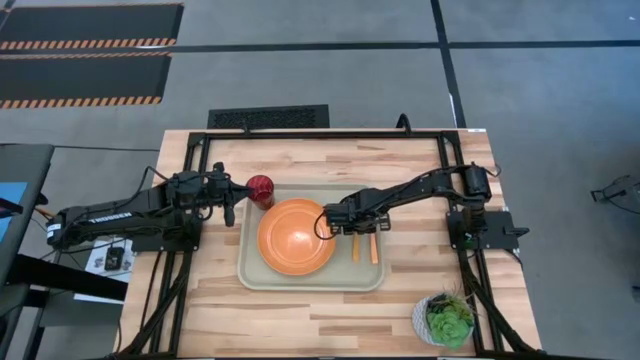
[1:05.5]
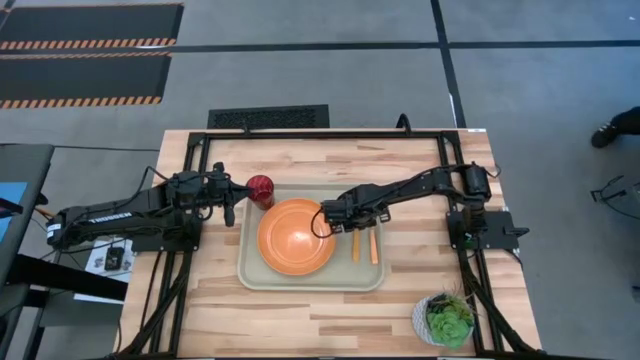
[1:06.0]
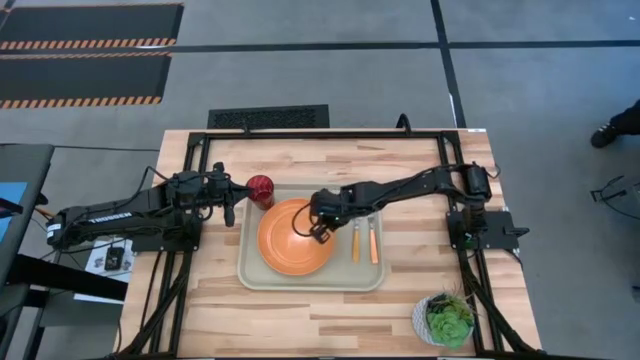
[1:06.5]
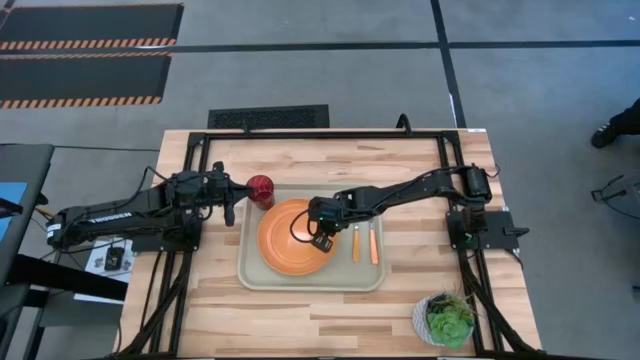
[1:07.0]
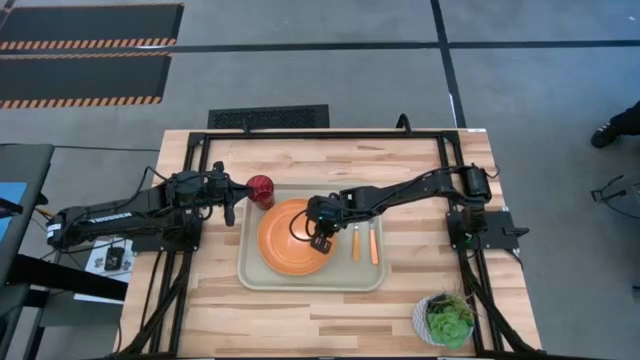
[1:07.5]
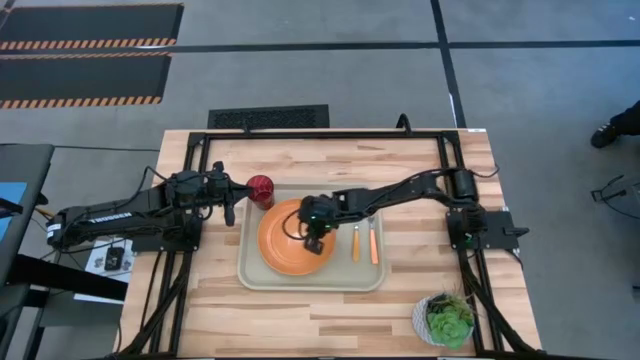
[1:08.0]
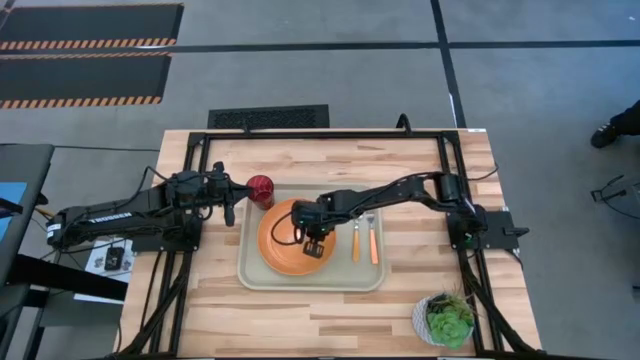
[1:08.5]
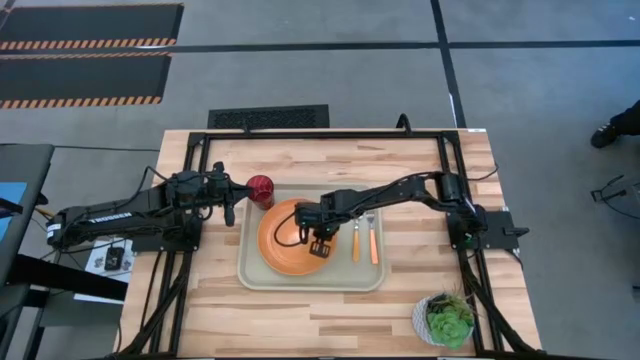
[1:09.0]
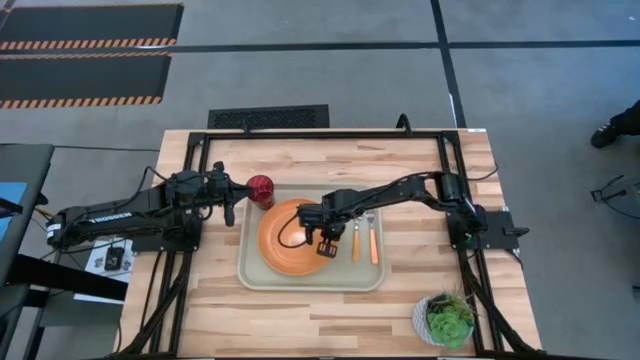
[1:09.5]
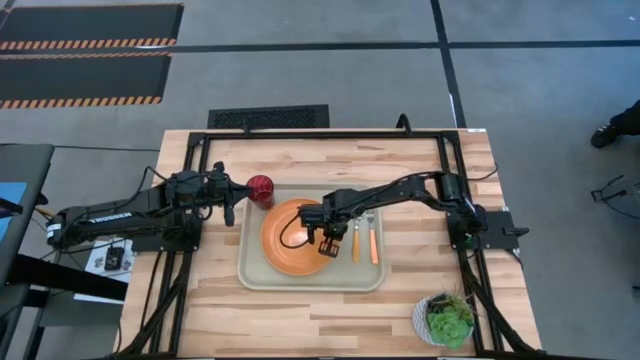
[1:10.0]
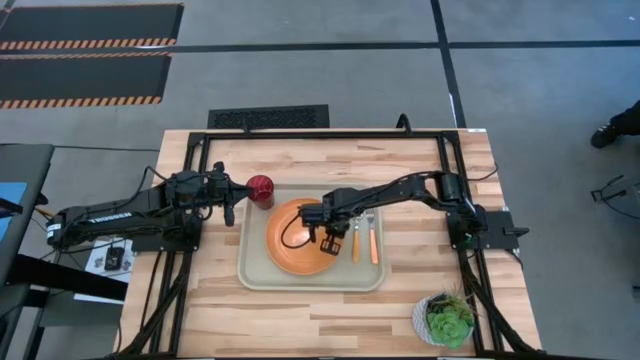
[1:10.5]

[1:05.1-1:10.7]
Task: Pick and place plate/cup/fork/spoon on tray
Adjust the orange plate on the gray serving tray

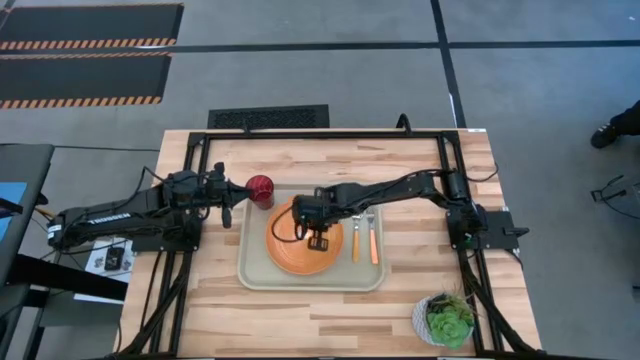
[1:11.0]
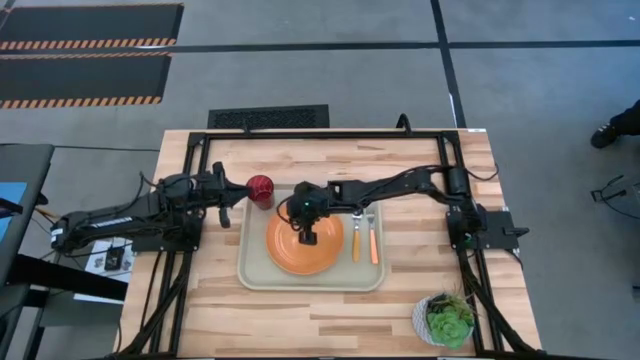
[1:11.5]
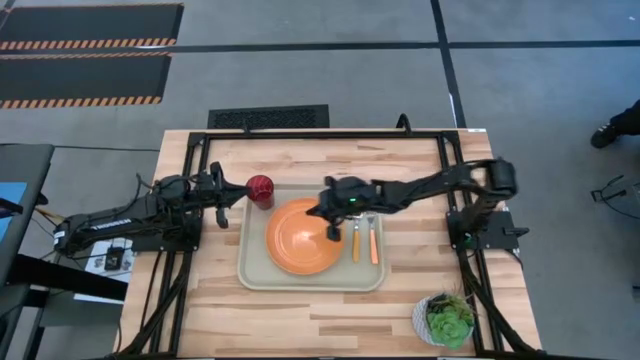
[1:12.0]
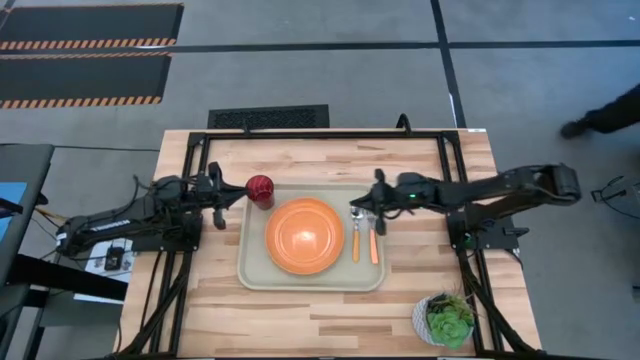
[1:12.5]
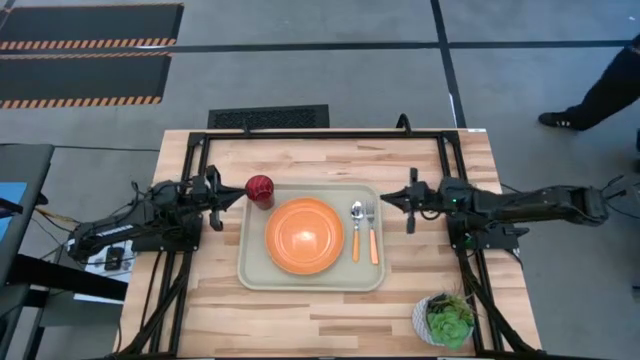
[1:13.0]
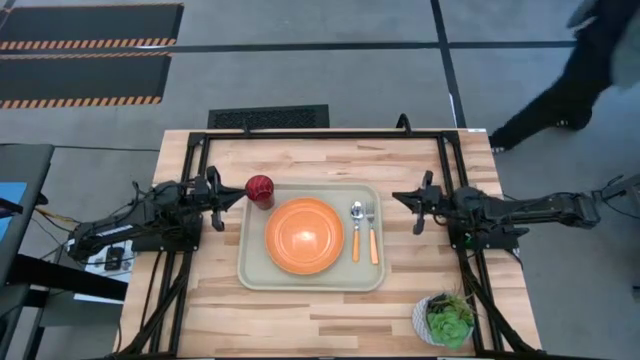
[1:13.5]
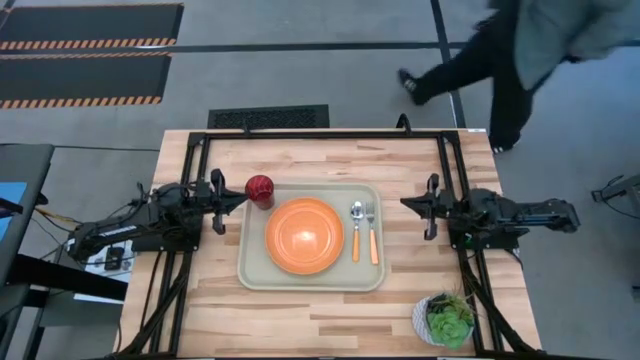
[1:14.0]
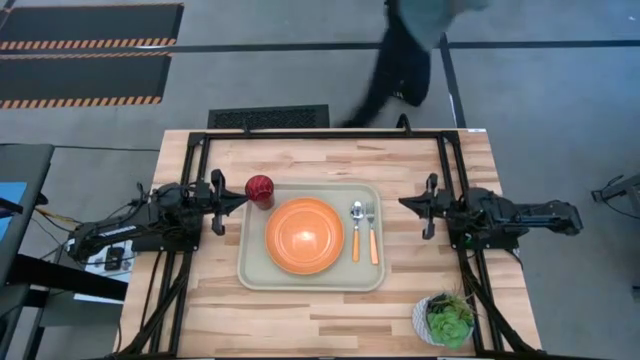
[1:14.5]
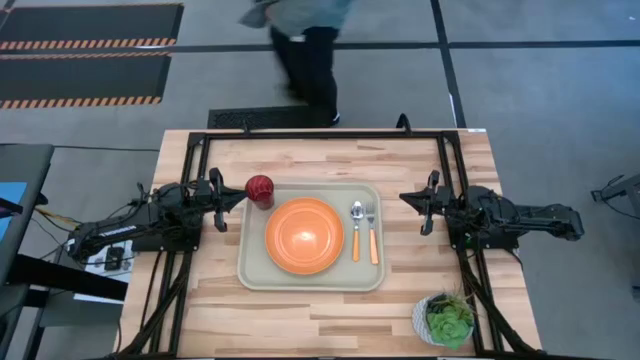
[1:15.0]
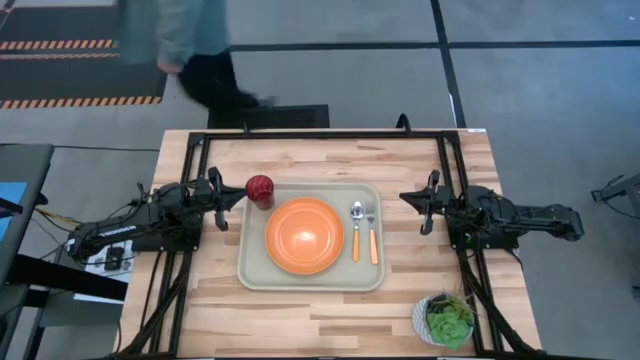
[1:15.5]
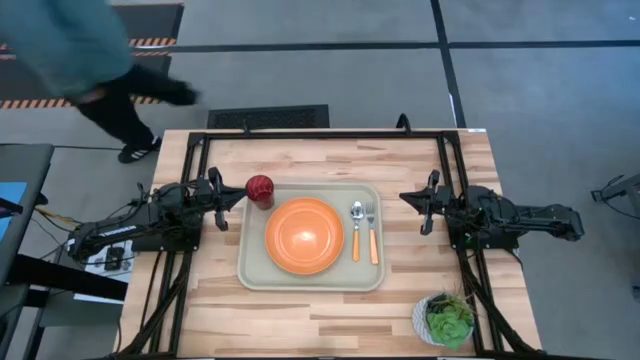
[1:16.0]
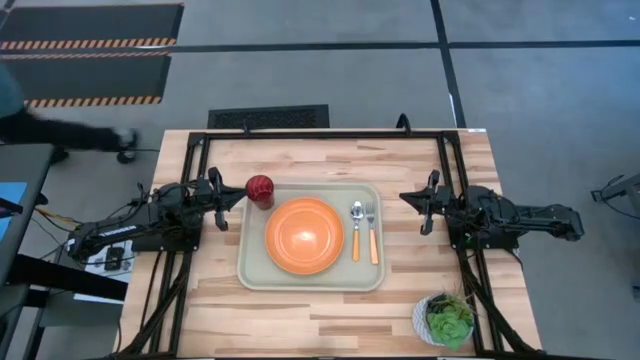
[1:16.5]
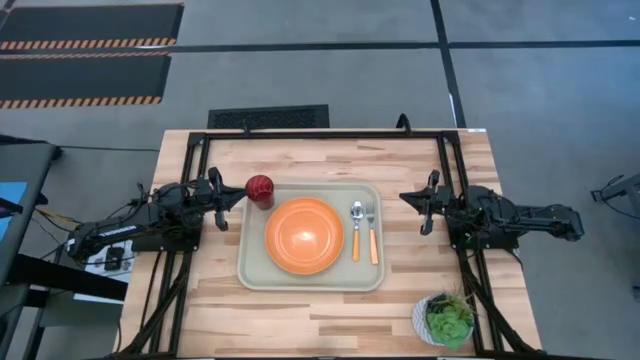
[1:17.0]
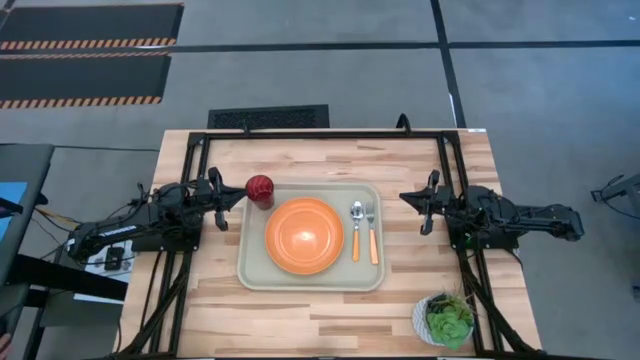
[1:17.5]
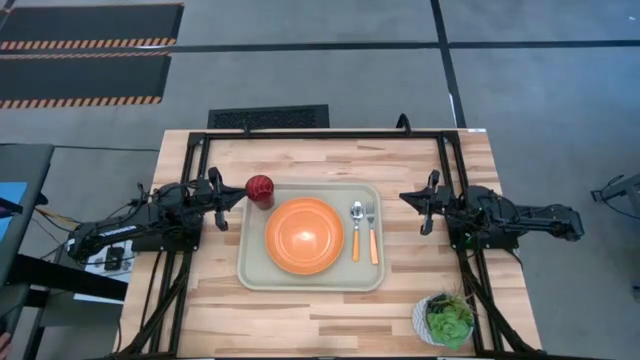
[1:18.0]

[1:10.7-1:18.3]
Return to Home Position

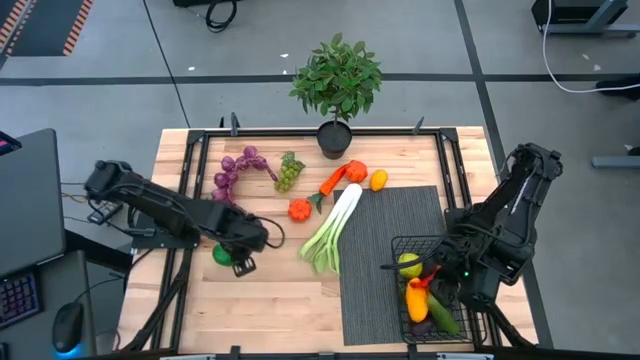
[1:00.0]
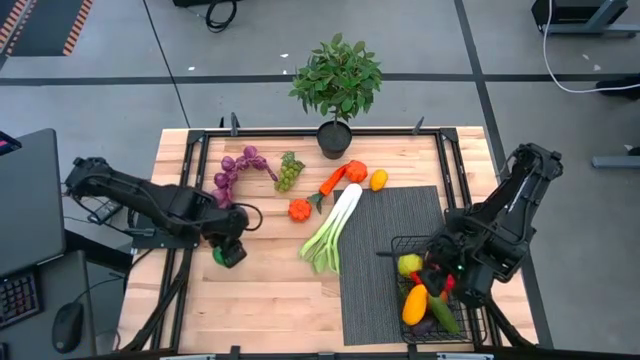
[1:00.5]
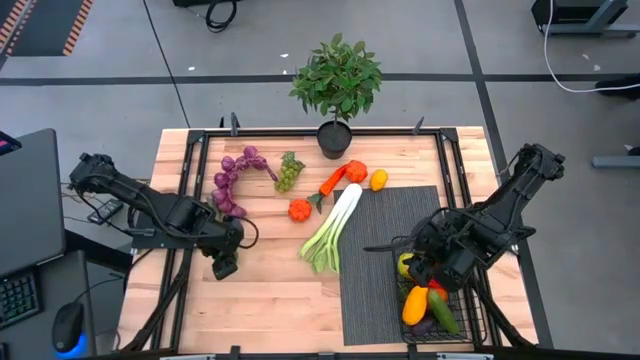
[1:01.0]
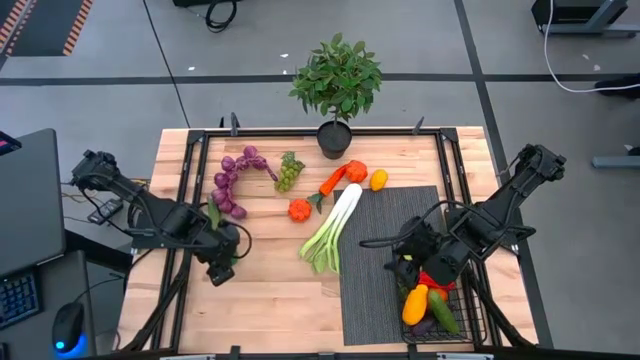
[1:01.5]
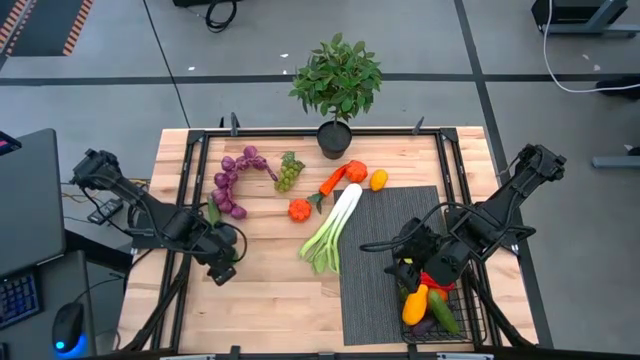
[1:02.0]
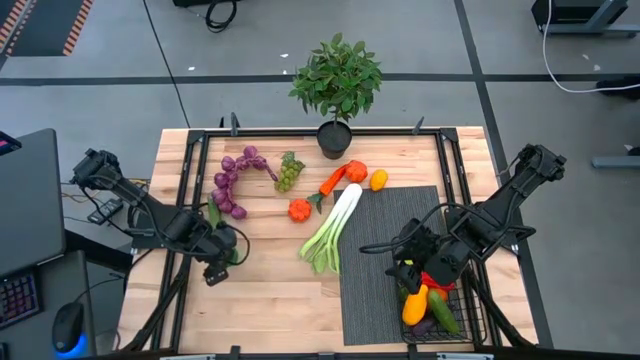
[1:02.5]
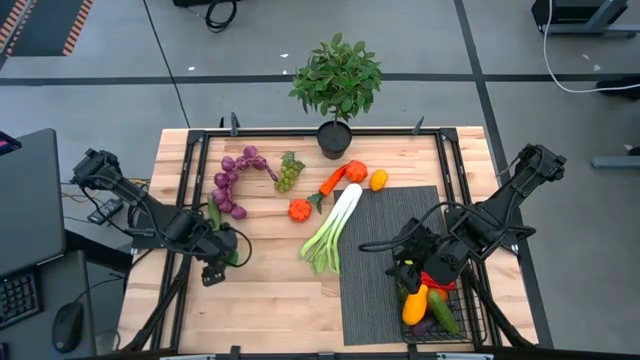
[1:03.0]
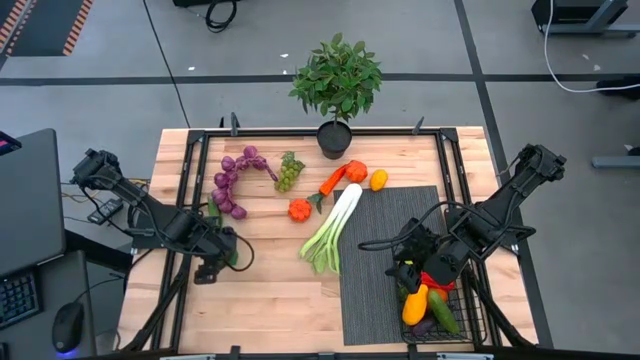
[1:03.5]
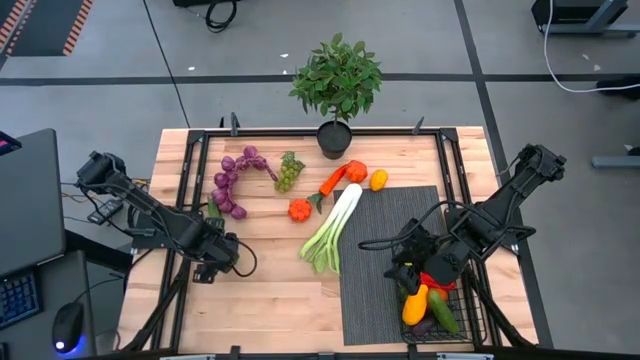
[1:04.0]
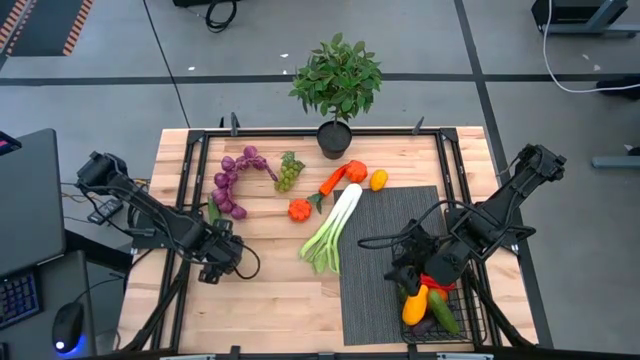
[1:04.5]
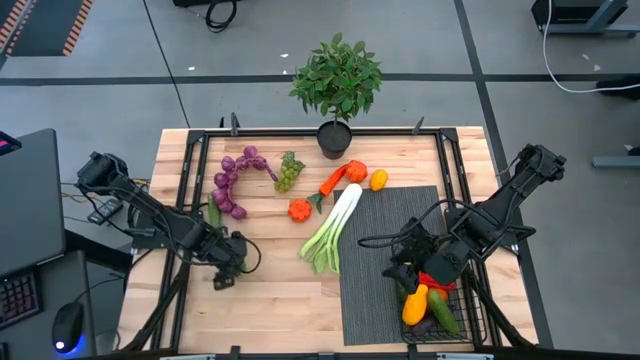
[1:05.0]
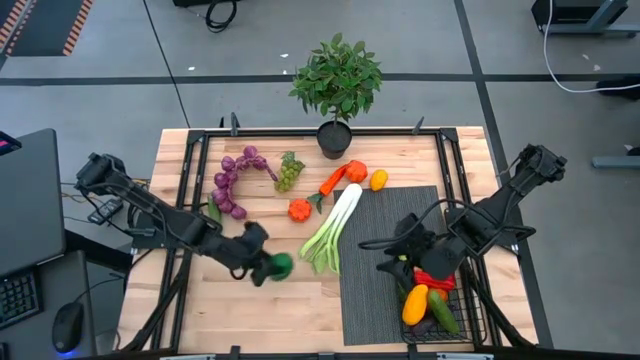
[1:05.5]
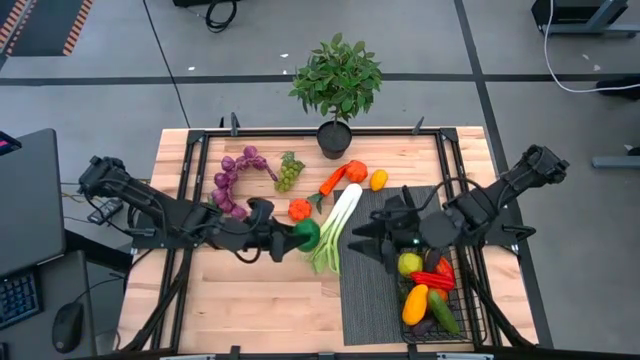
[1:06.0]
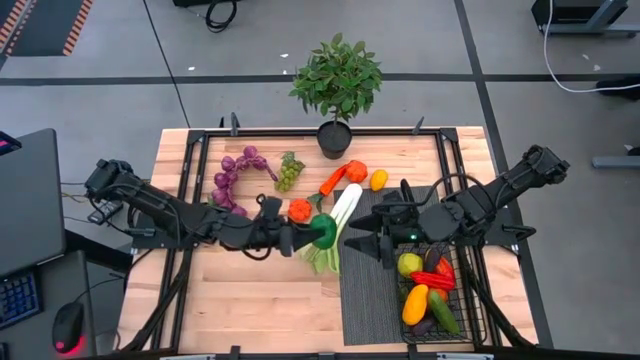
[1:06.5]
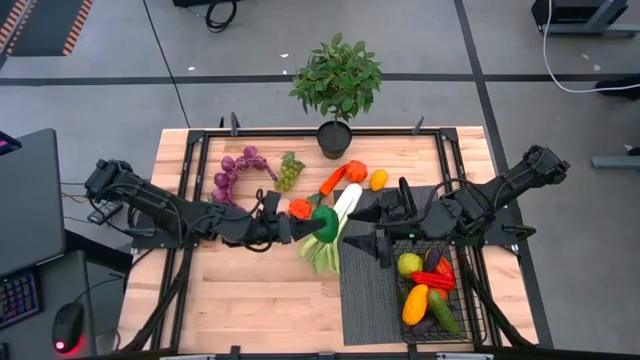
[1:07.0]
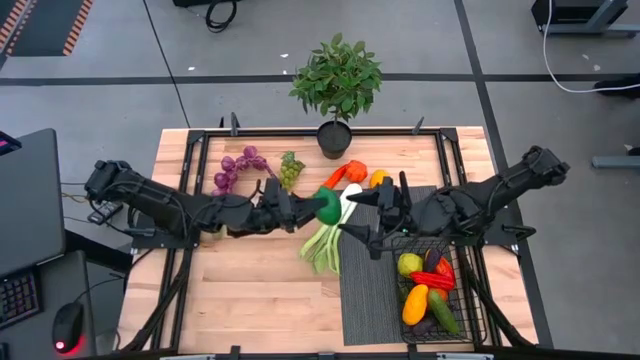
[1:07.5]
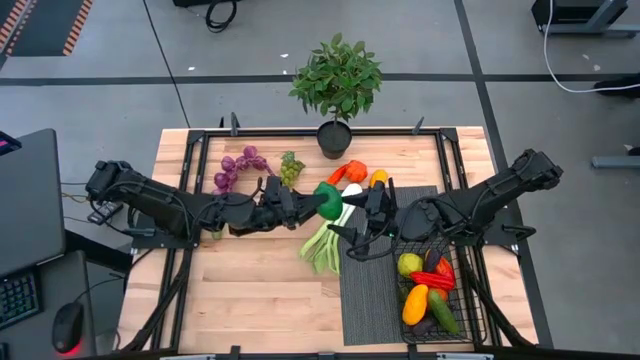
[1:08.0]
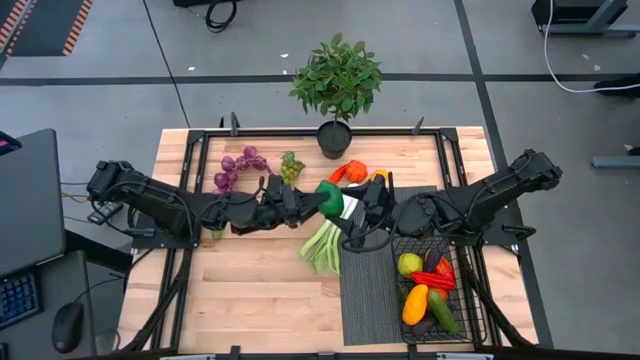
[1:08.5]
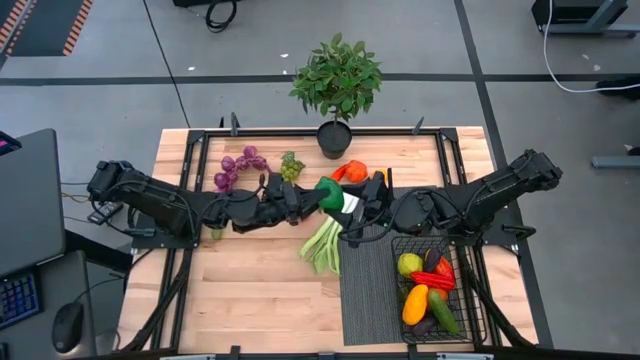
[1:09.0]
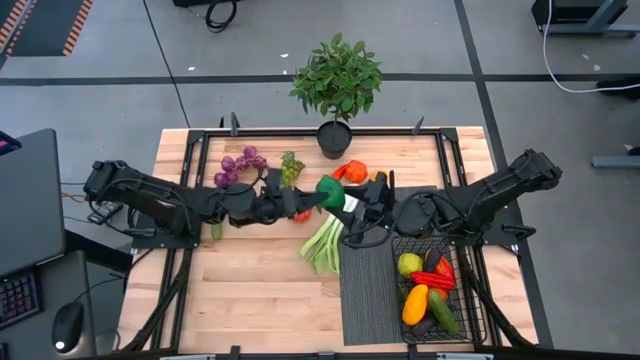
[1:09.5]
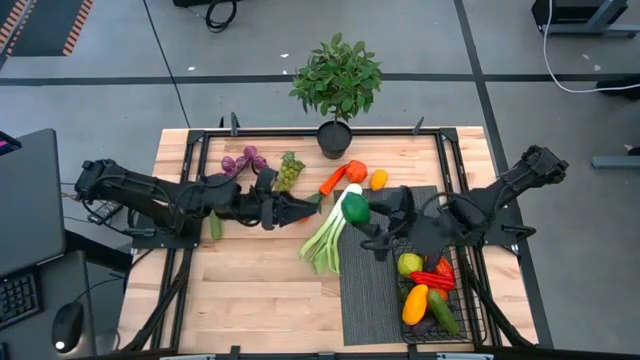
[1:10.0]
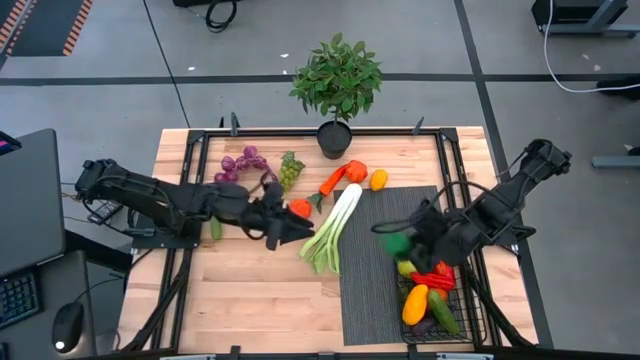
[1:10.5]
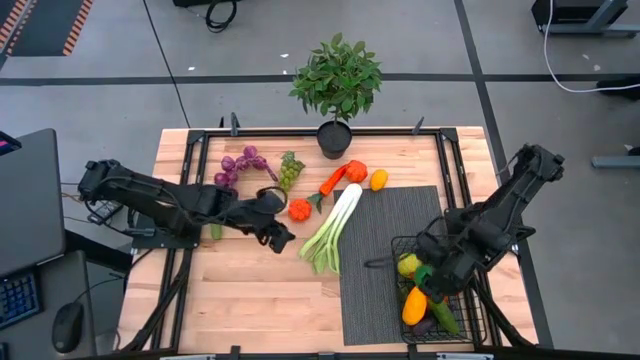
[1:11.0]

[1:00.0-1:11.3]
Task: Build produce basket
Put the lime into the black wire basket
